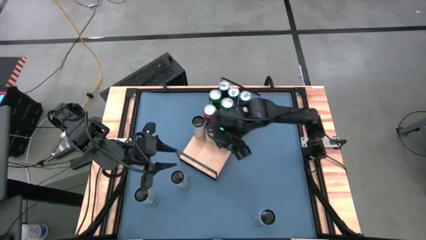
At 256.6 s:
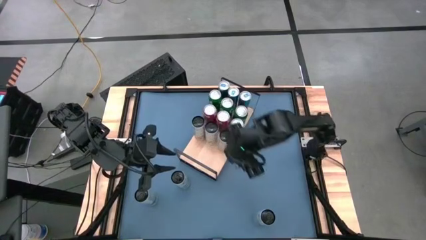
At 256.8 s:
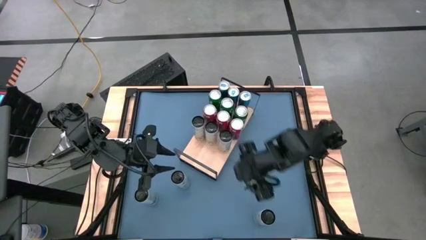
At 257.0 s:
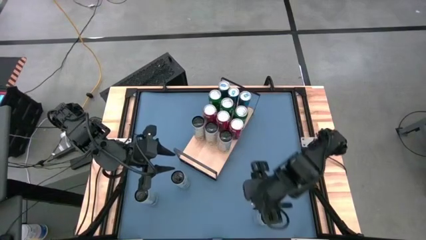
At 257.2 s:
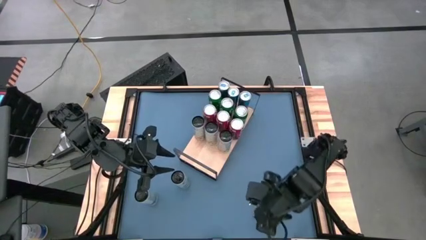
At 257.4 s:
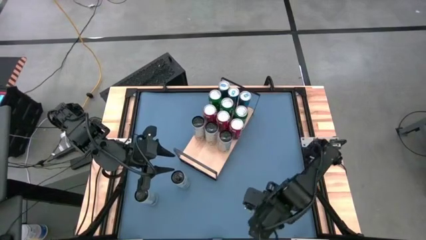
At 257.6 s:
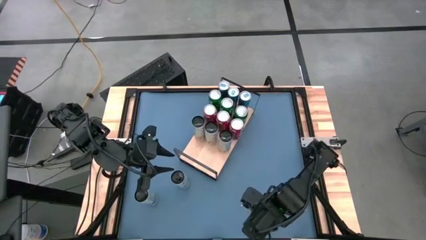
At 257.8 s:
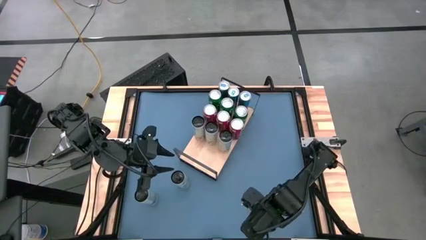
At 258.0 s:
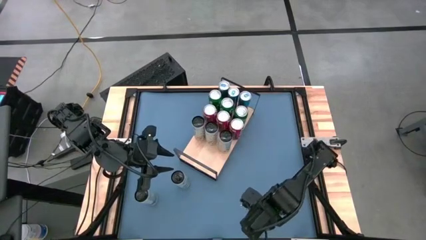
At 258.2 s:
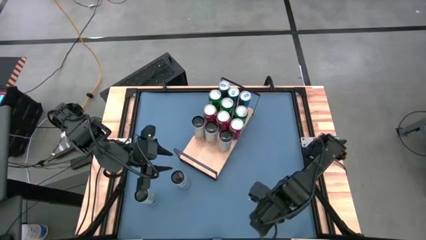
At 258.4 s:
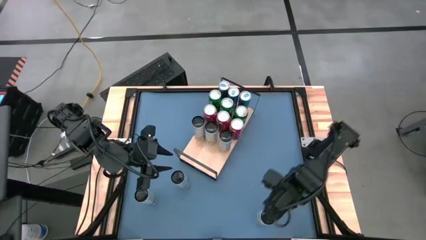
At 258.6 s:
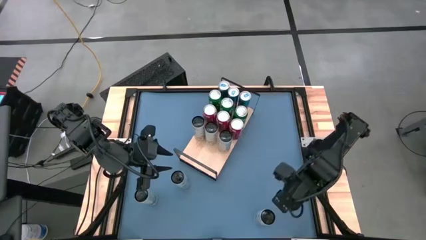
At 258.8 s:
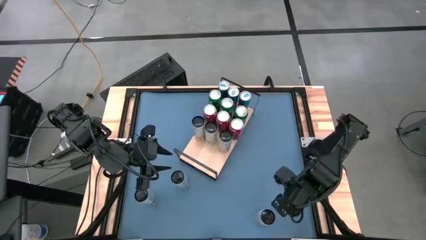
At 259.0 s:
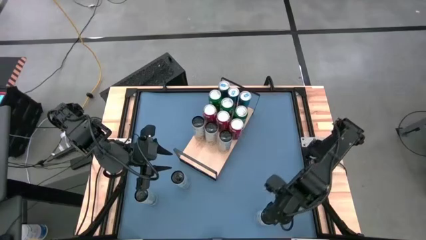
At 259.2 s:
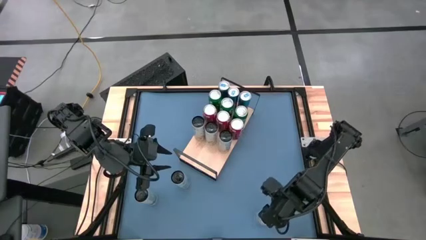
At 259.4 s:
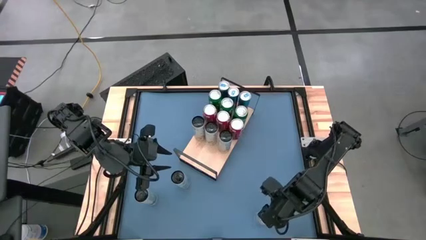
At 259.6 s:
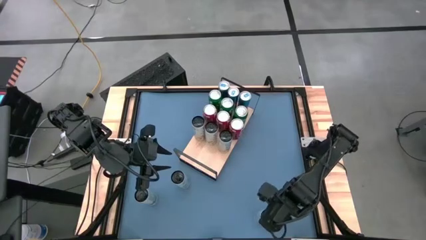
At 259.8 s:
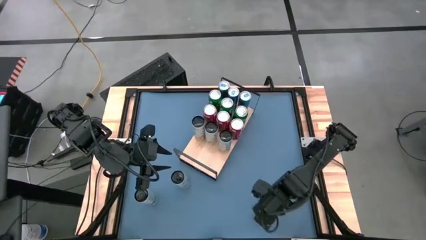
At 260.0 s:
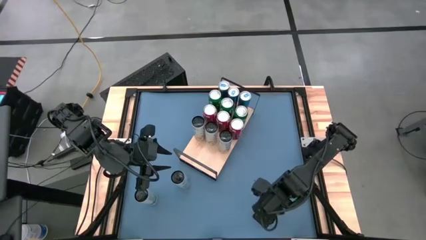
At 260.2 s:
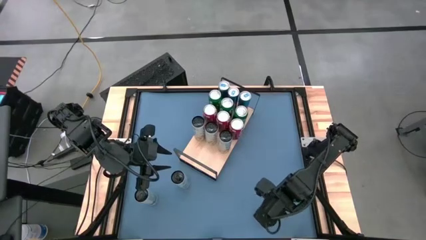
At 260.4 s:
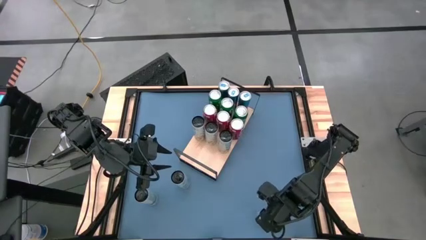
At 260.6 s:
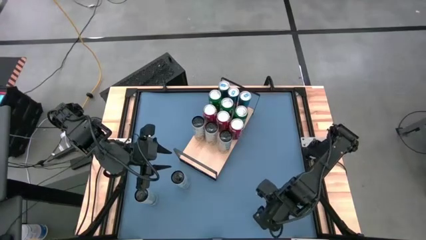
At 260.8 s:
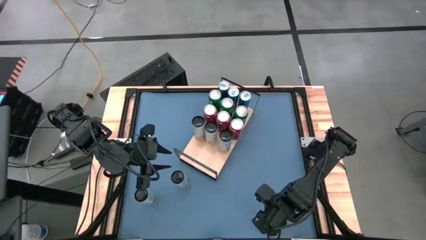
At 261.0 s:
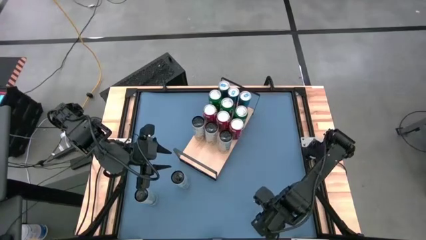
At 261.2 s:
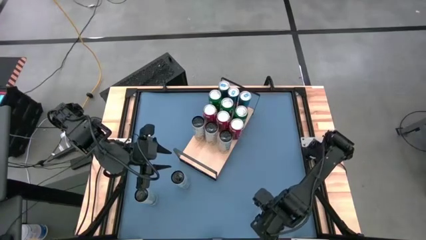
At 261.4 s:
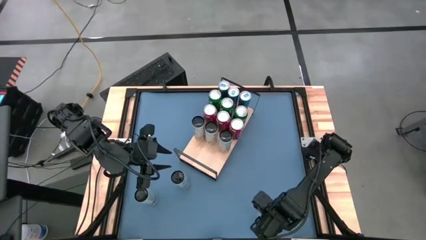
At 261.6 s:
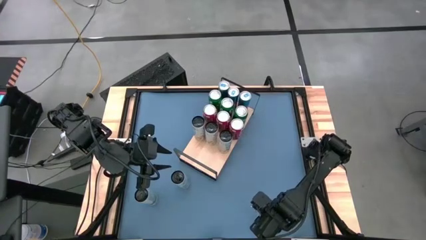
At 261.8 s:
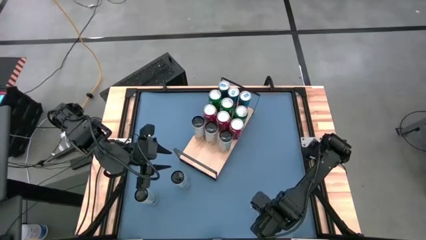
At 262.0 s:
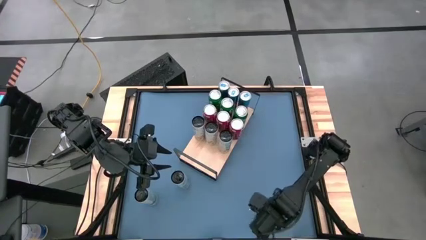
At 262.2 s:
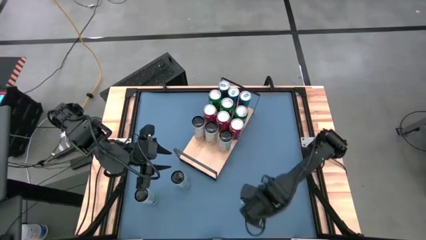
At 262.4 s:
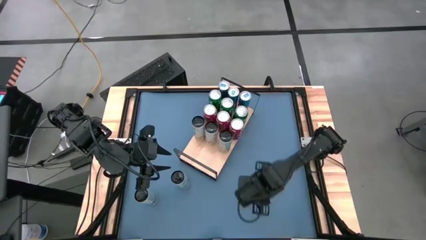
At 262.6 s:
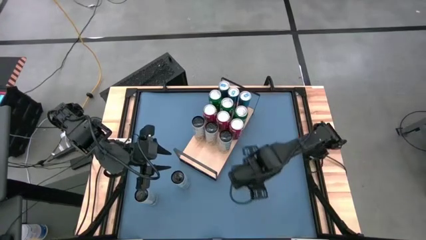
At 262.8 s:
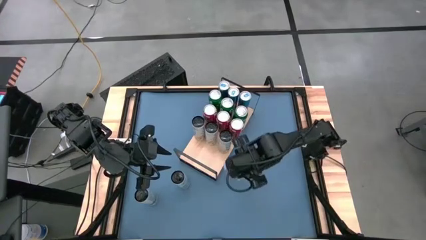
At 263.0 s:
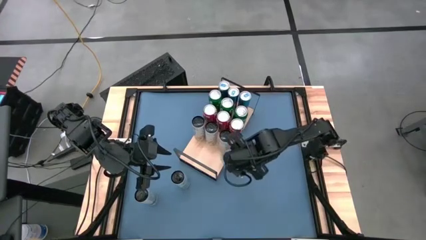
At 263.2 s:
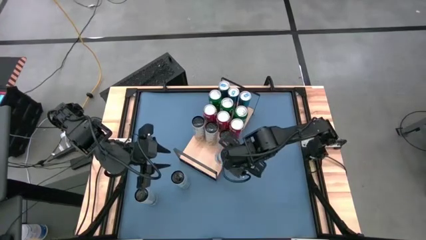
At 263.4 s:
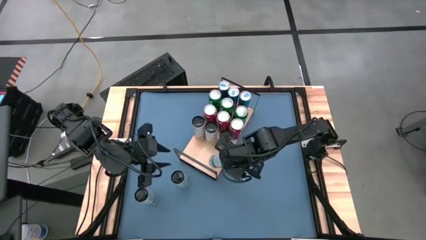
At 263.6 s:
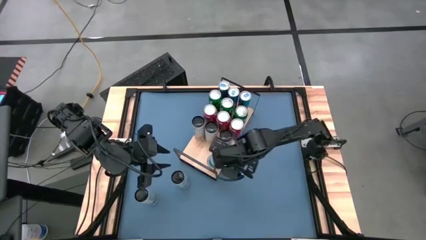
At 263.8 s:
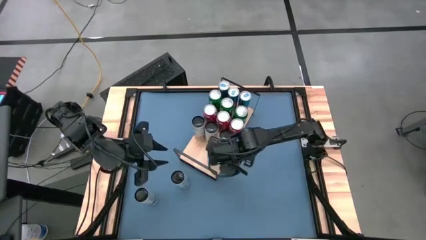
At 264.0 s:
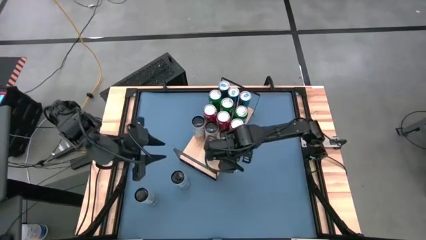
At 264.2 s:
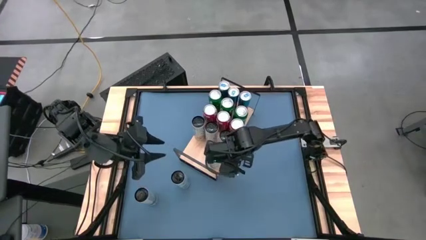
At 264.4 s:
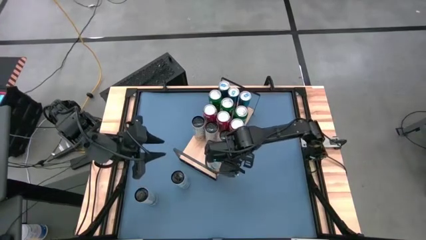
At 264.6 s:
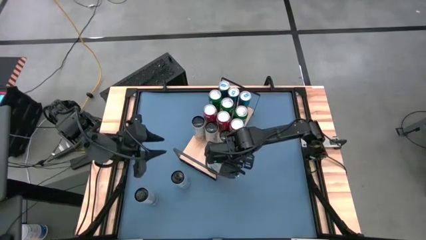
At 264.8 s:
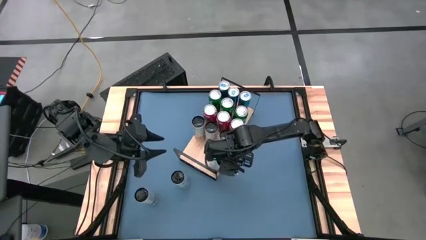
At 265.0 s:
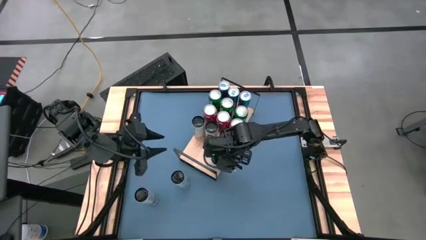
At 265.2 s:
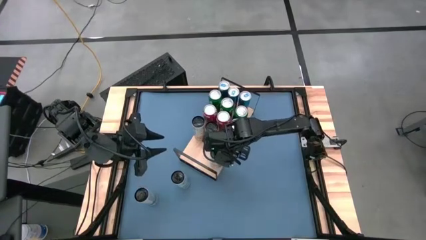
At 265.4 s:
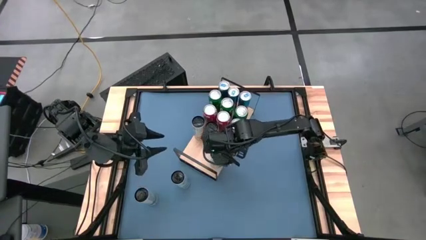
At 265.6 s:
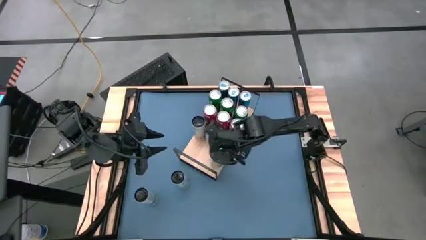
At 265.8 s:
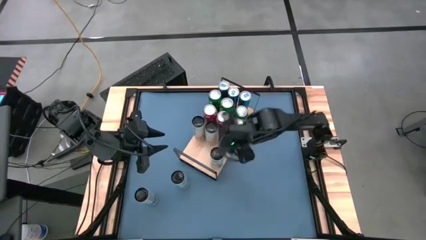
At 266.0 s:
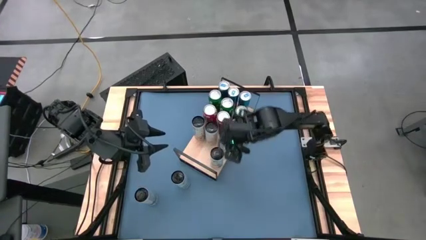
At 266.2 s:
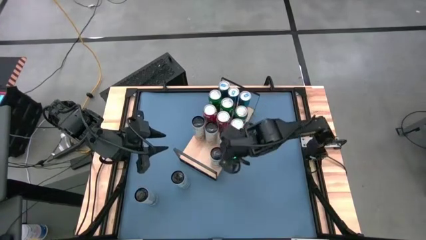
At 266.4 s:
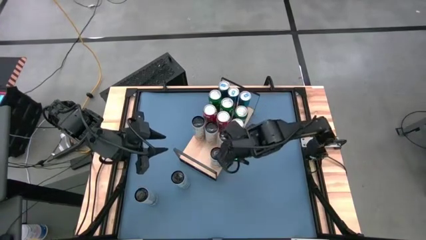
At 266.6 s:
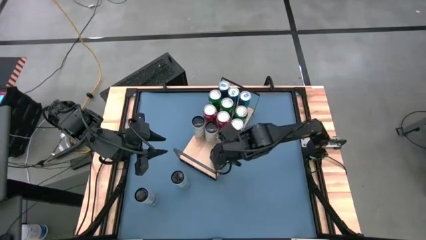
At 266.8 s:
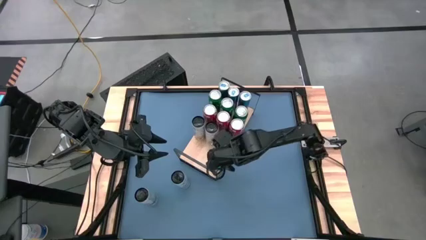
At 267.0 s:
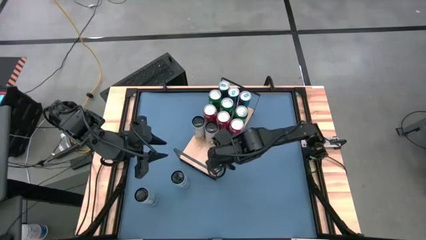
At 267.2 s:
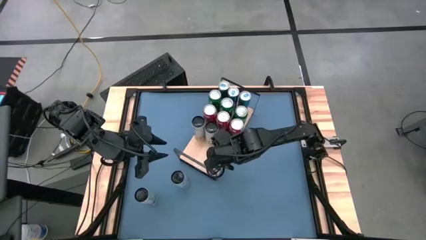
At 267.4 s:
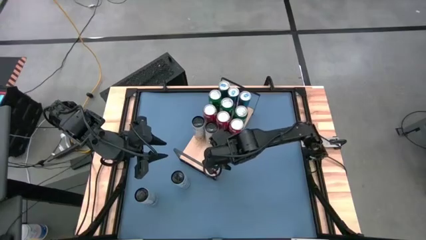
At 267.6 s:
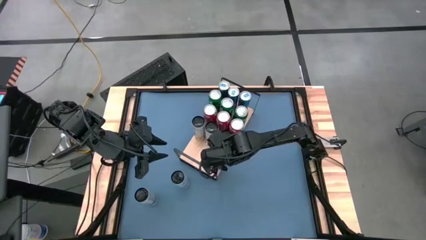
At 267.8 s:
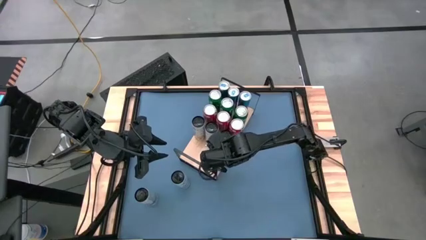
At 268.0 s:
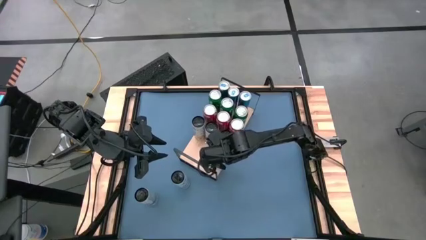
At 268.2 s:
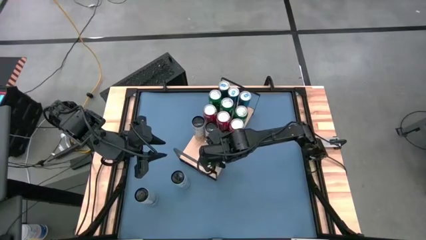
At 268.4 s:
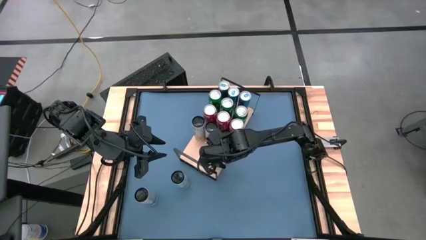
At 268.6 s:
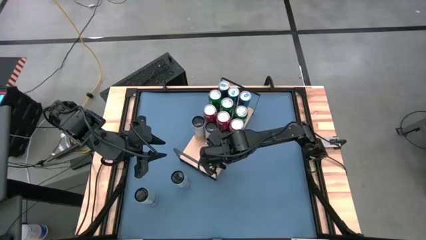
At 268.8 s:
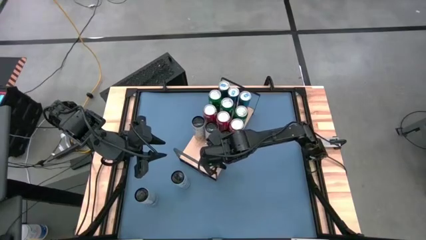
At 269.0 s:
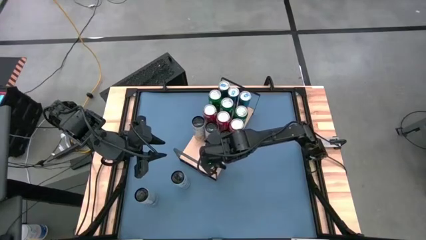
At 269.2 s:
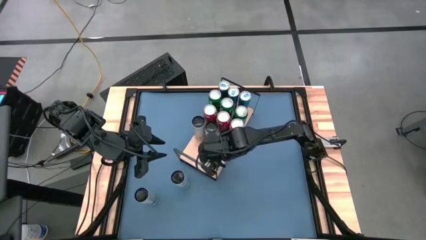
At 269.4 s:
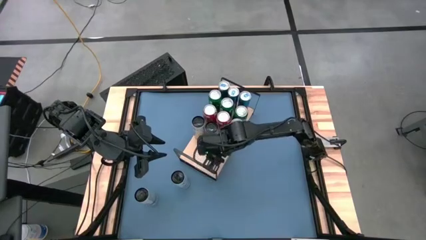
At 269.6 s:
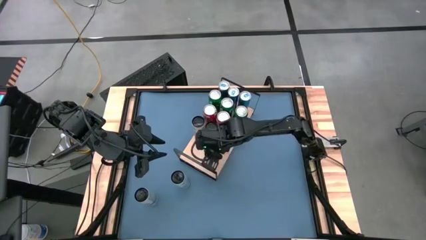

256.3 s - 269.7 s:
Task: Place canned beverage on shelf
Put the right white blue soda can on the shelf
